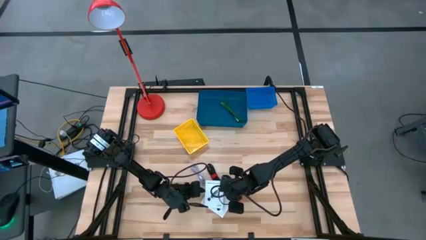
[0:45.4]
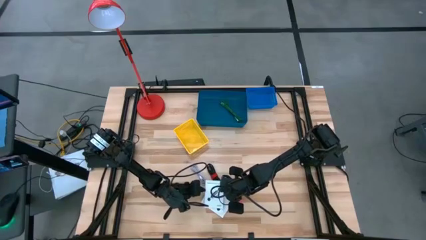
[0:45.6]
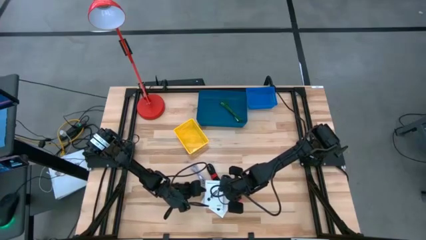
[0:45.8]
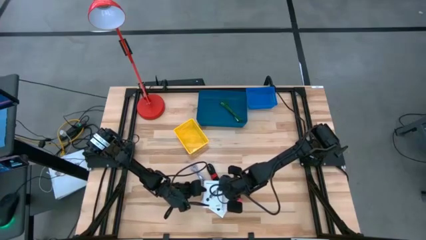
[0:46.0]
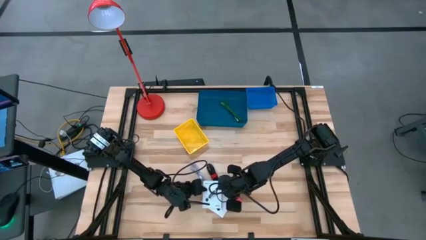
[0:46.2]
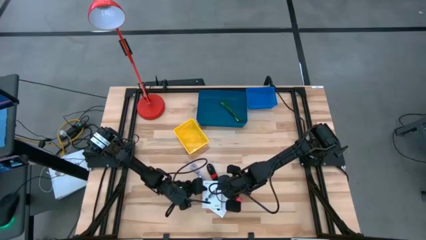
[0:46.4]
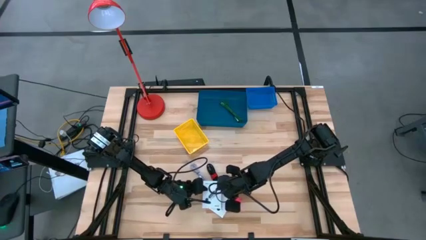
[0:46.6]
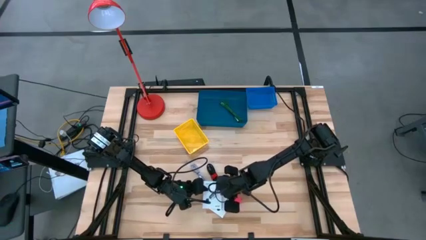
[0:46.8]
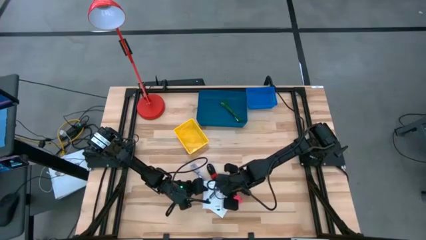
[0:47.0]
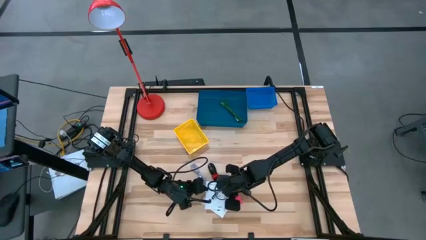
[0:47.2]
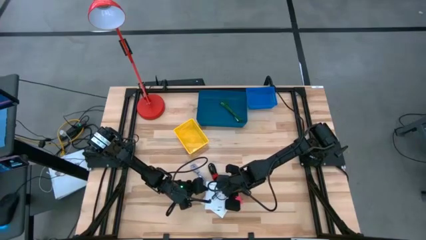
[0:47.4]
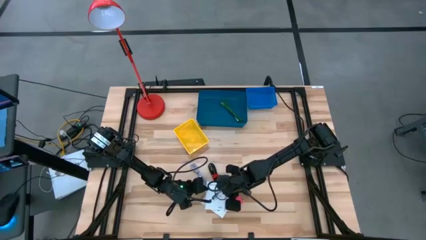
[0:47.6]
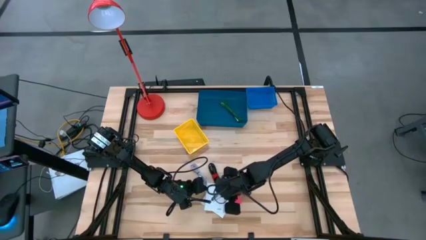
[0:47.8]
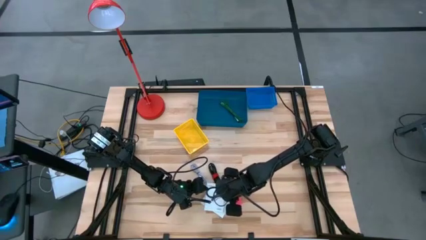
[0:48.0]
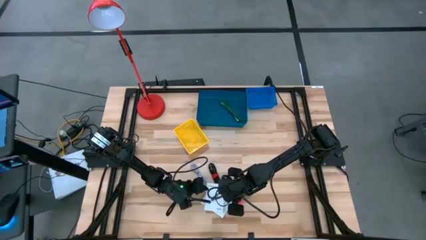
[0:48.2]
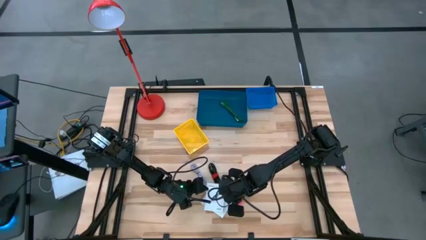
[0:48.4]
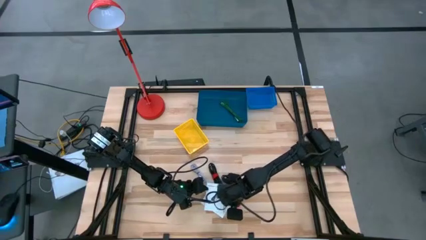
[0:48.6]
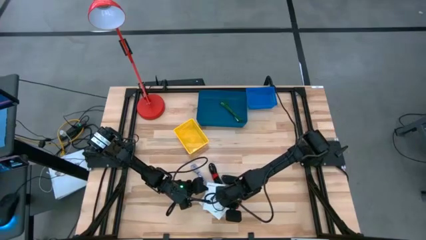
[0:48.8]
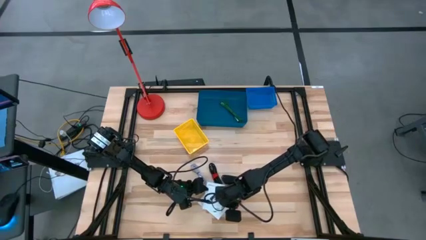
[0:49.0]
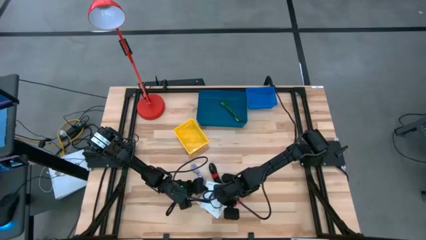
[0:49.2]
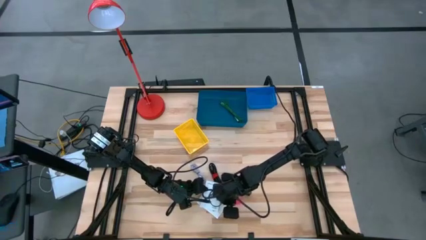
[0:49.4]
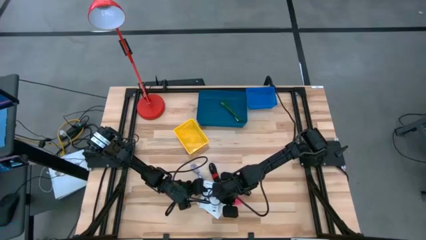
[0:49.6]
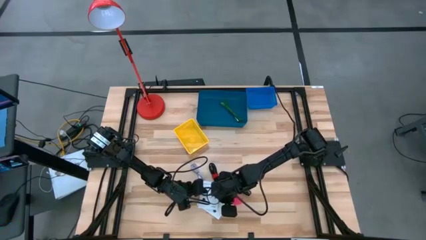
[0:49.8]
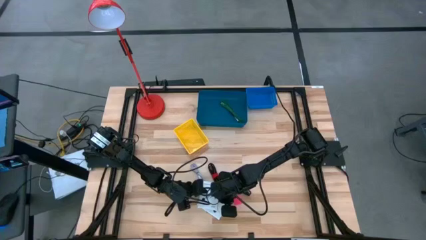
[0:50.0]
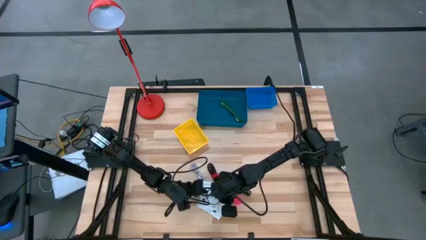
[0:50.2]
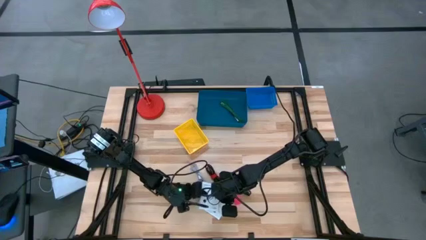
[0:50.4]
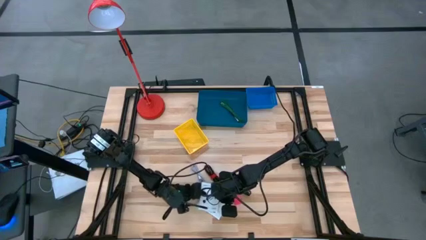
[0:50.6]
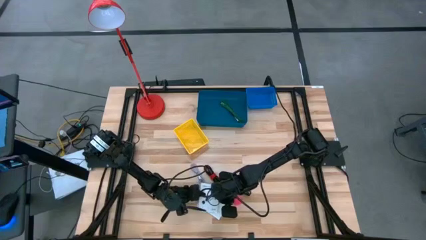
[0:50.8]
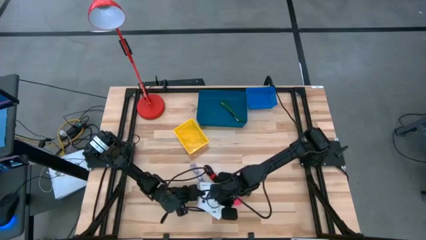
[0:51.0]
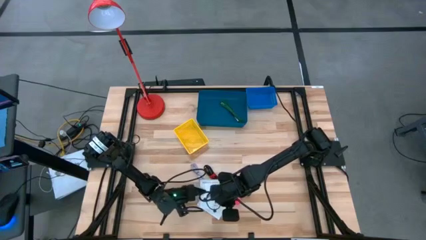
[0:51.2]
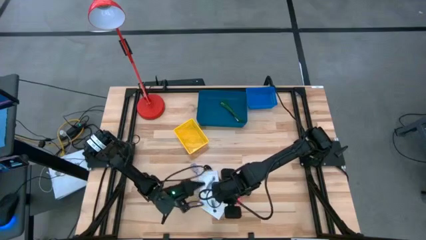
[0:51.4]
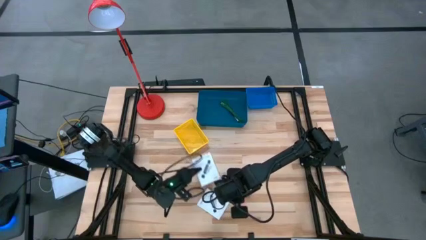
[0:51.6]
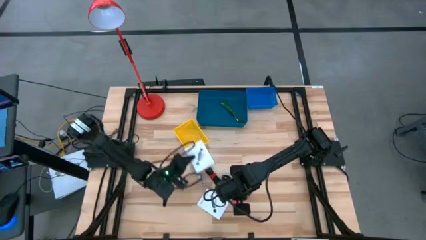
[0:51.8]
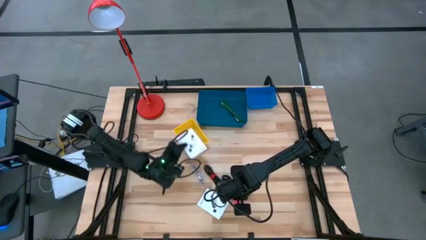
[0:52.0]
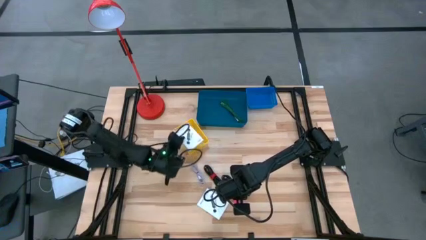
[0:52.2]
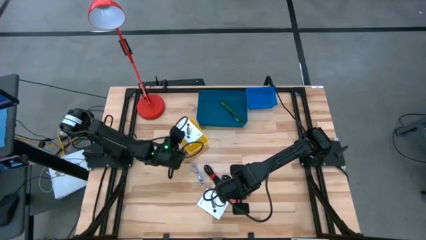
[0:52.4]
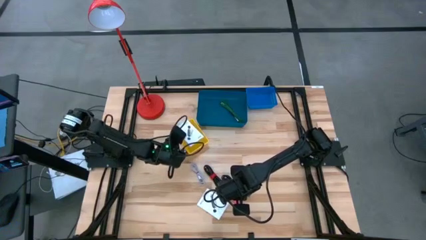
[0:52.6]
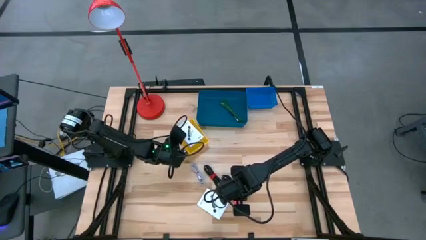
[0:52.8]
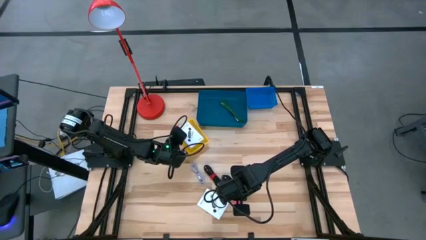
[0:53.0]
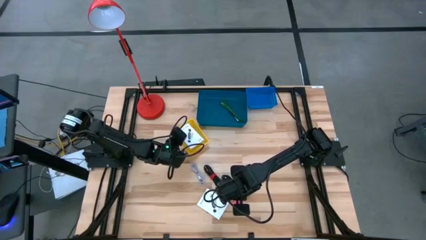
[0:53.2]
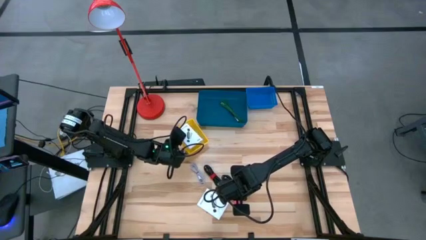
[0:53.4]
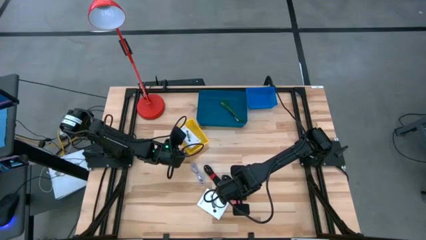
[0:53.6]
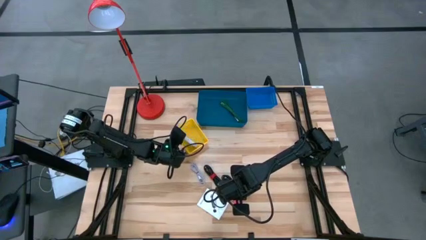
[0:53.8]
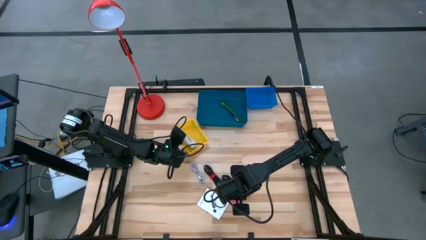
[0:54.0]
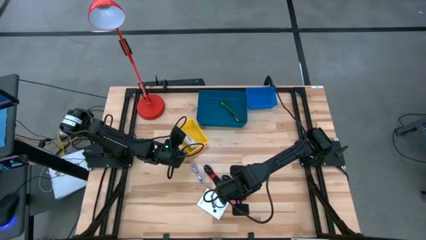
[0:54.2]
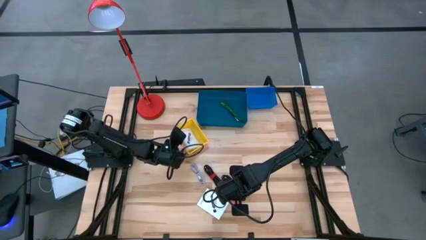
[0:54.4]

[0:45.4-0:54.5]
Task: Pick and place items into bin
Put the top white card reader box into the yellow bin

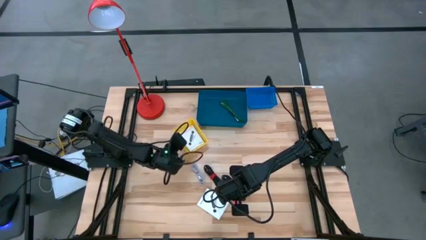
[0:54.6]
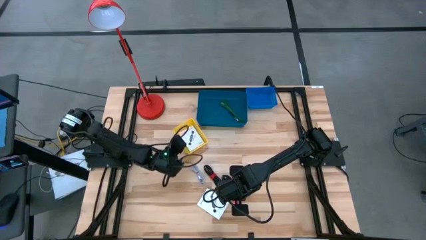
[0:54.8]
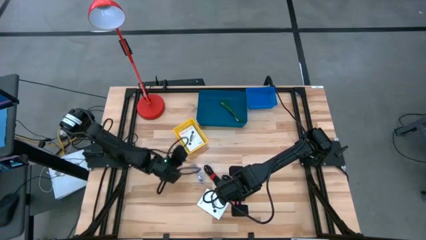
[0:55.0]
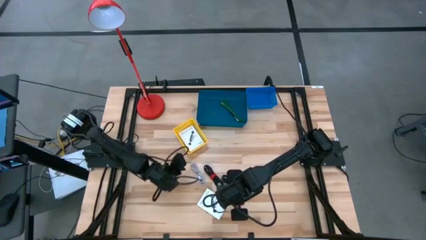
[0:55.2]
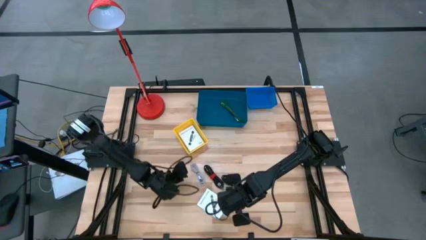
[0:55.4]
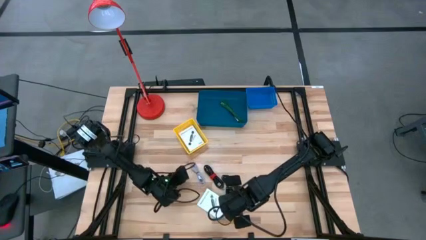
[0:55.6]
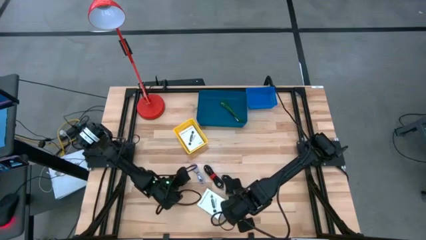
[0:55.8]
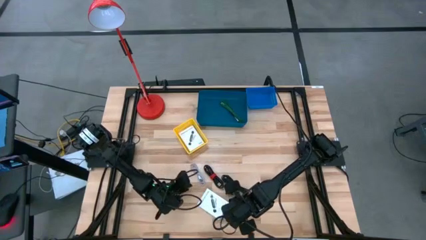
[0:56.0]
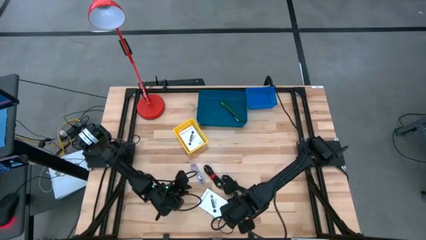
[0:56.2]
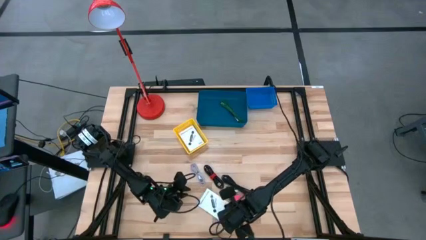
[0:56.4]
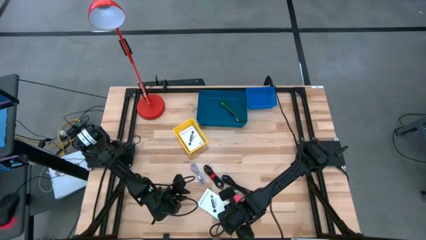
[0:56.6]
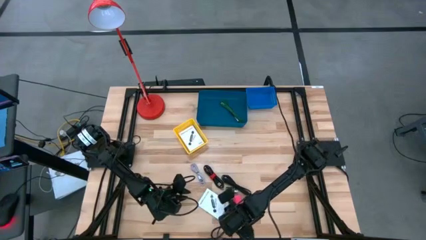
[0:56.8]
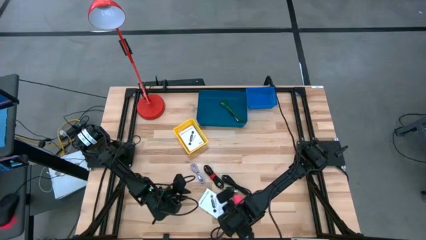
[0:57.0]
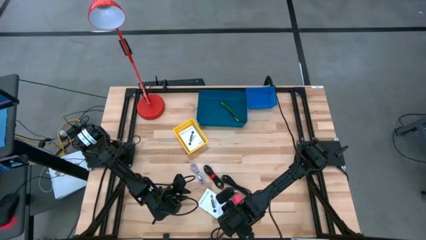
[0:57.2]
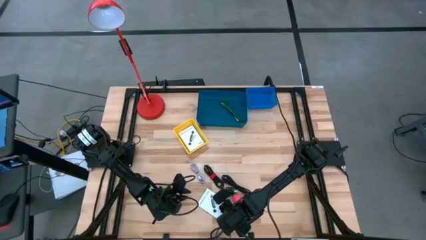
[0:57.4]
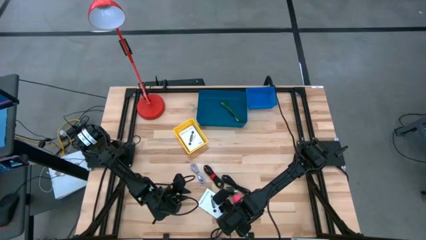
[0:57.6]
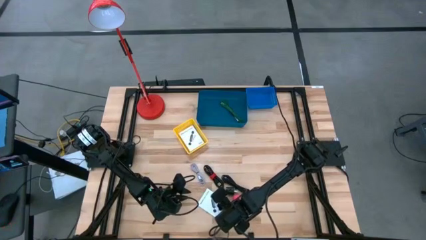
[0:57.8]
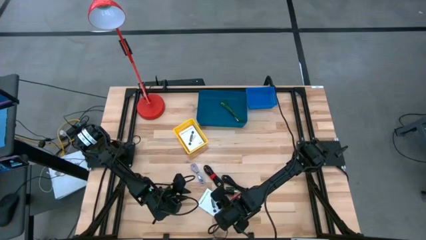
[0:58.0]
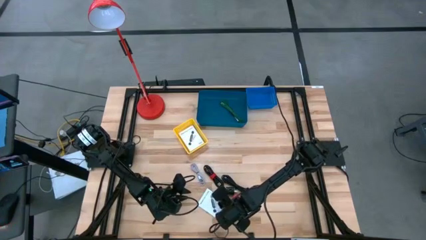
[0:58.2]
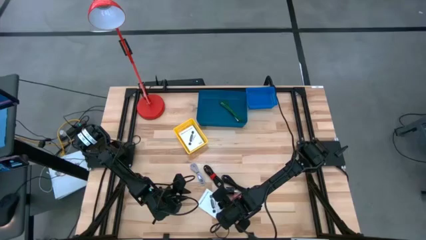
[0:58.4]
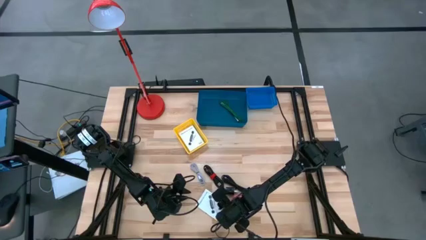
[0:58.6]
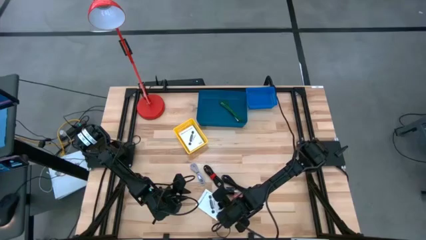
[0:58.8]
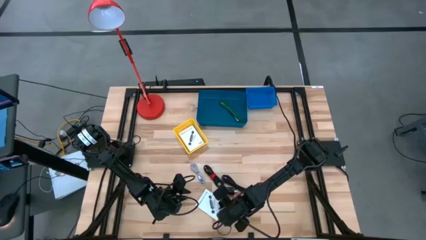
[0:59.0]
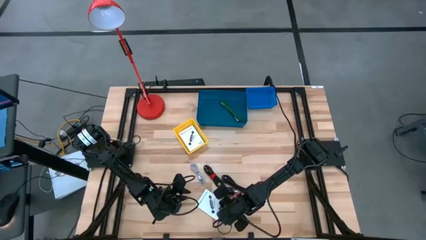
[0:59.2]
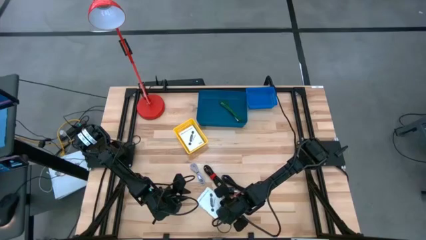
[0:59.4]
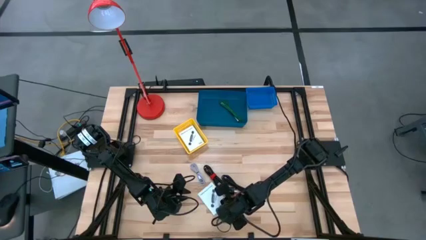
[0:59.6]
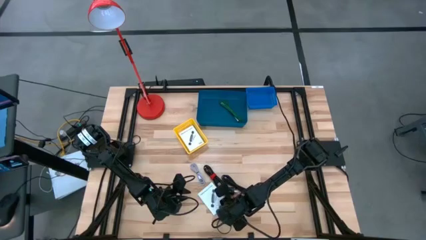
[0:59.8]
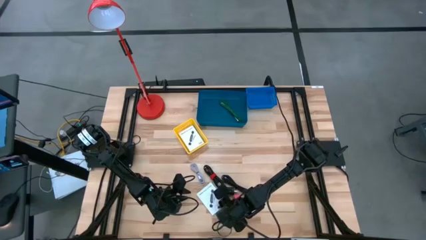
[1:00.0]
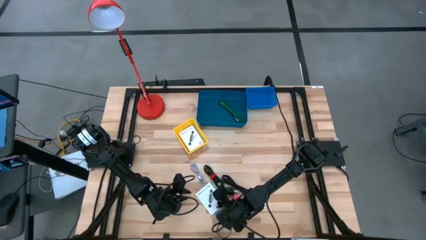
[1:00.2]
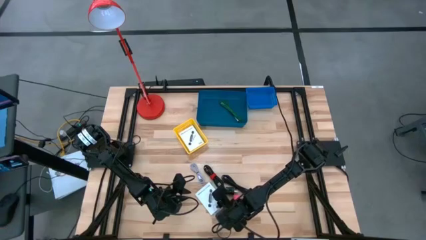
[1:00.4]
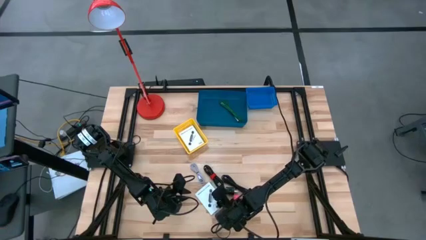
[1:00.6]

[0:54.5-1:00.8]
Put the white card reader box into the yellow bin

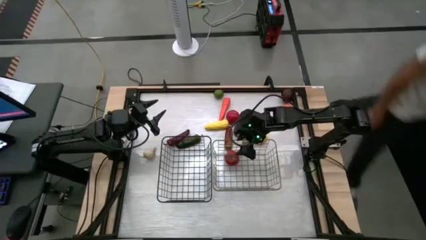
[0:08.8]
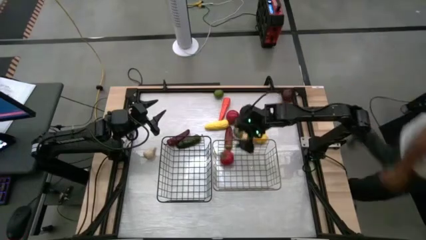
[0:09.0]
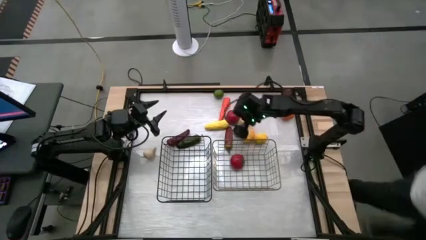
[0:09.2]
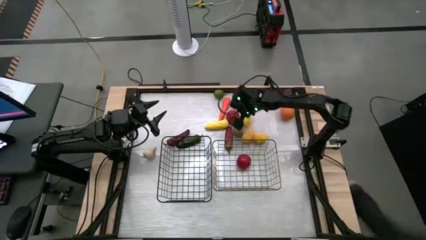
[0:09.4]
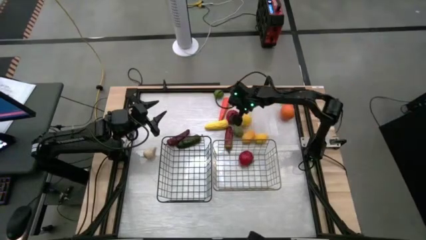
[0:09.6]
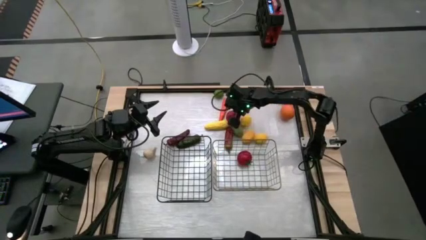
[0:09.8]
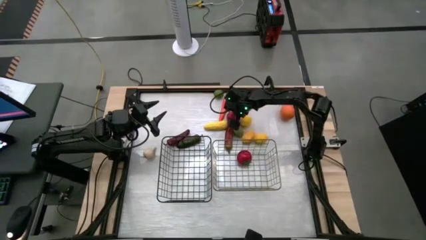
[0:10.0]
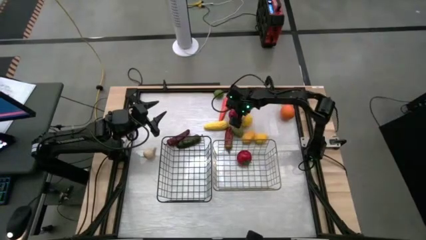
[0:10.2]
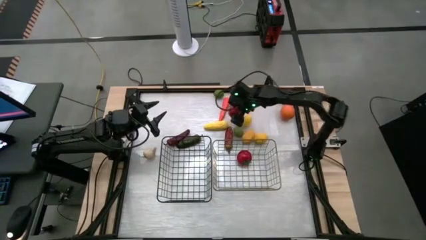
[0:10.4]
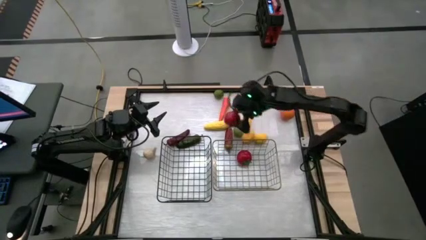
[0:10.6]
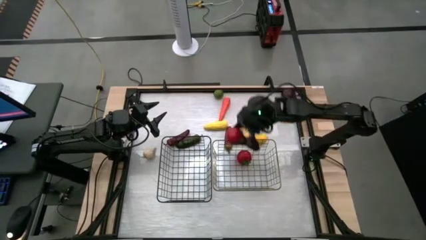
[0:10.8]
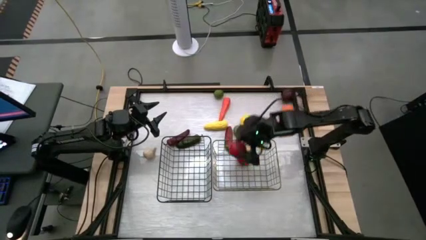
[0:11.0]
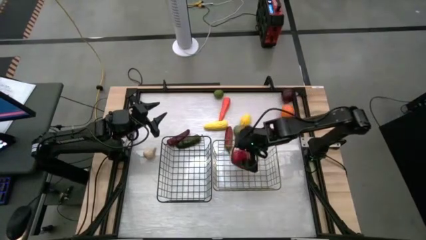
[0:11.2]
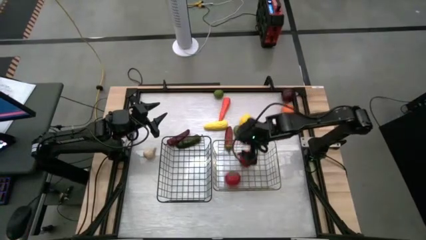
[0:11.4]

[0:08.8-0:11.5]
Task: Sort produce into baskets
Put the tomato into the right wire basket
